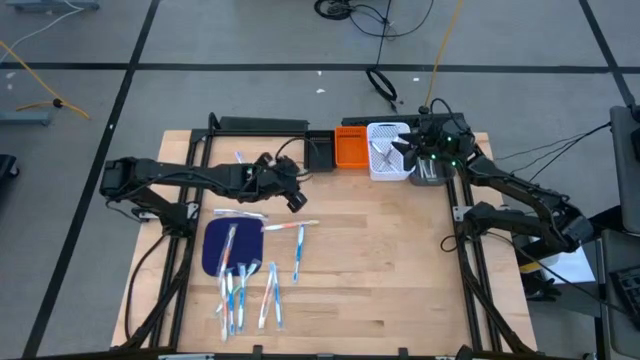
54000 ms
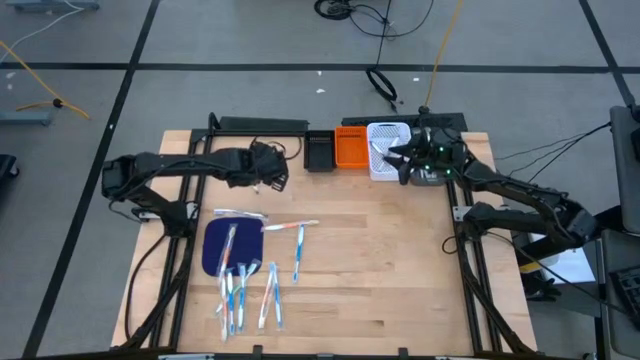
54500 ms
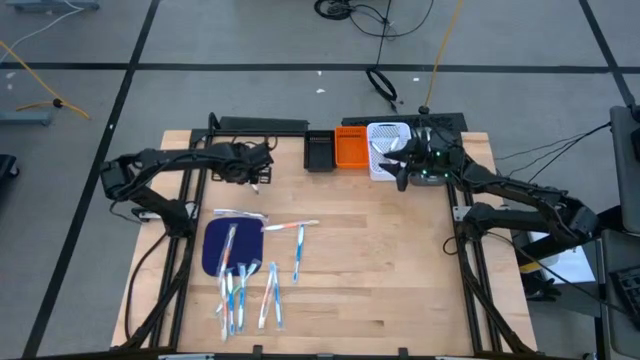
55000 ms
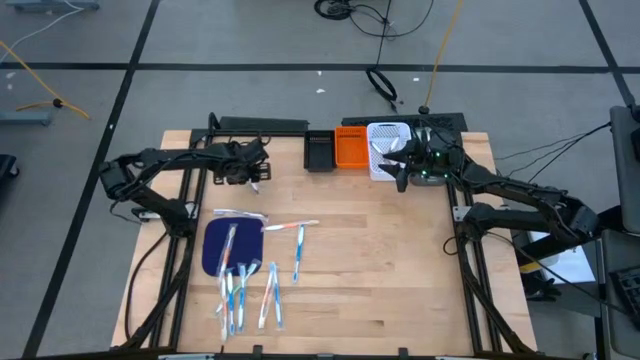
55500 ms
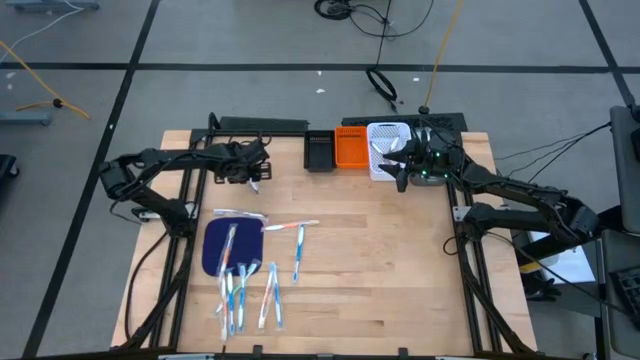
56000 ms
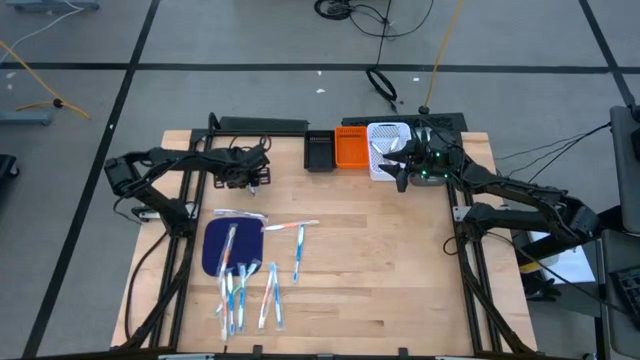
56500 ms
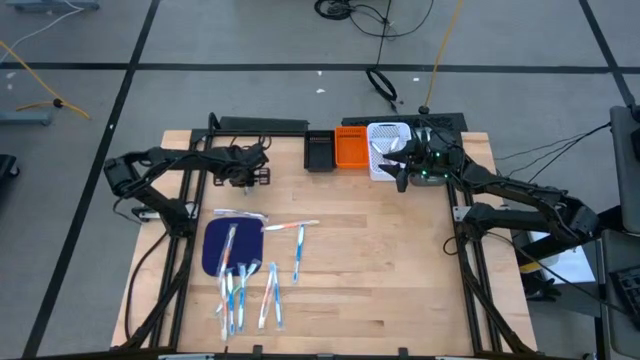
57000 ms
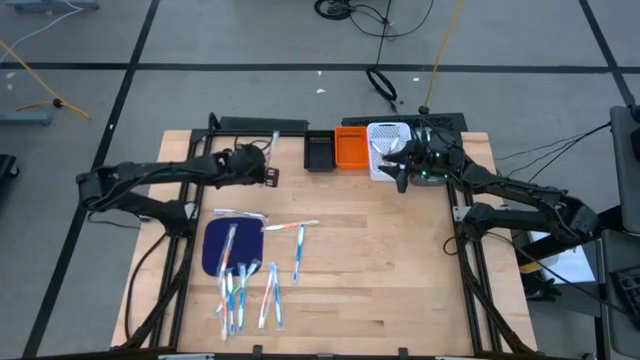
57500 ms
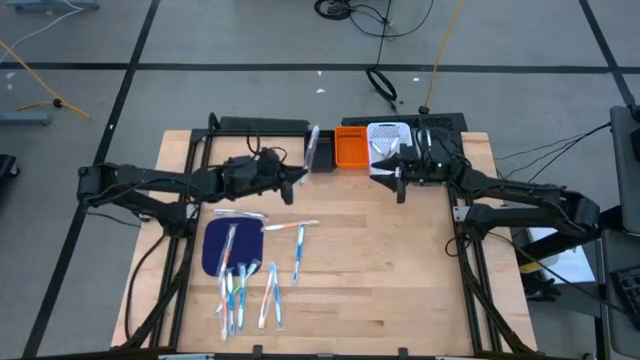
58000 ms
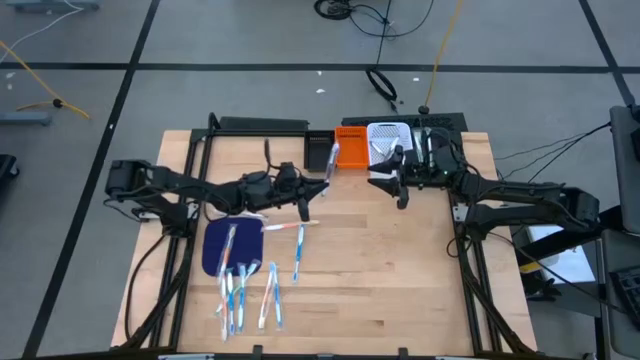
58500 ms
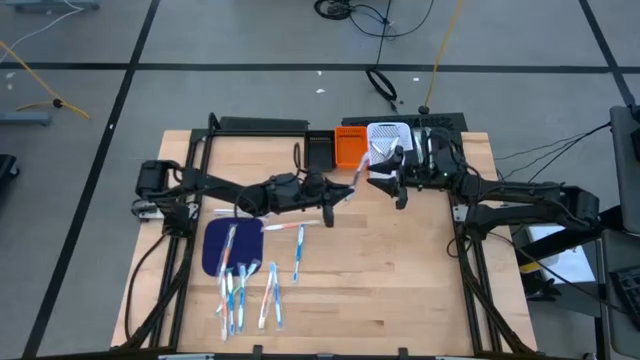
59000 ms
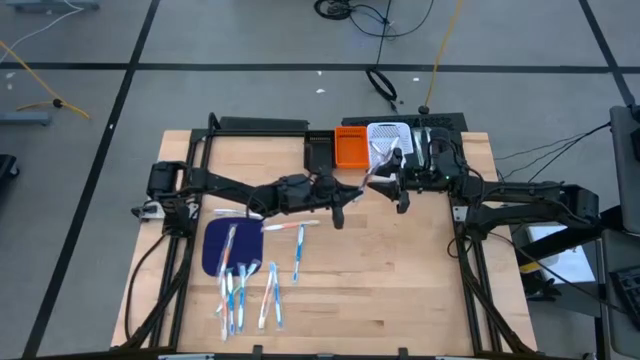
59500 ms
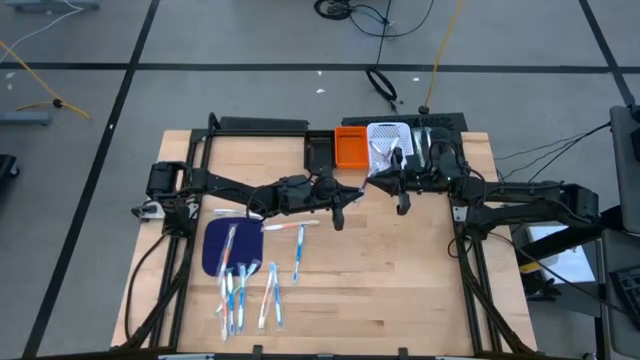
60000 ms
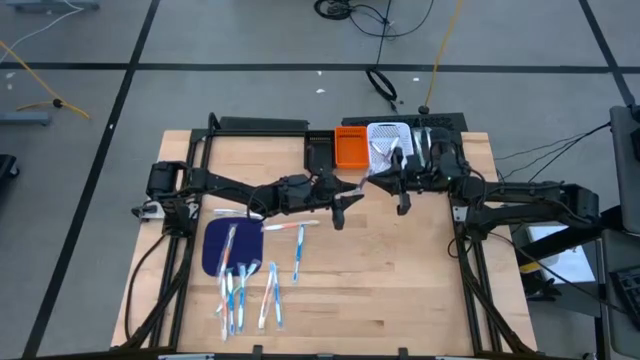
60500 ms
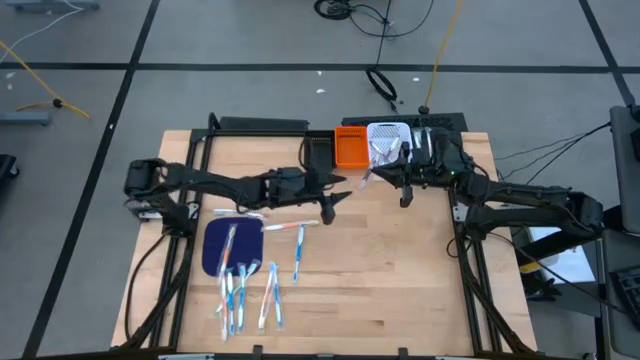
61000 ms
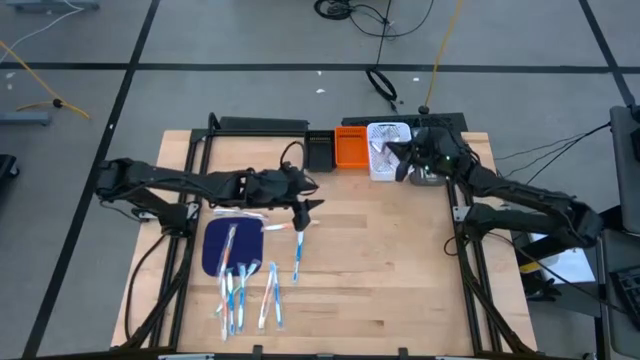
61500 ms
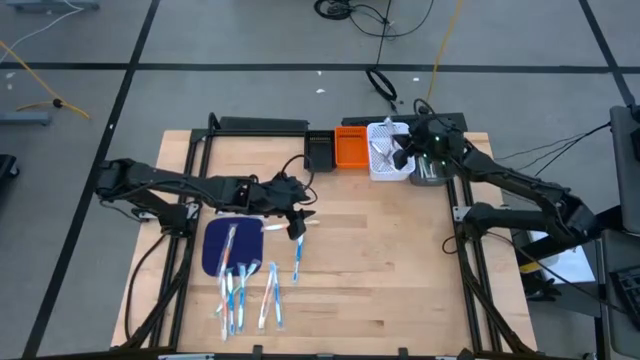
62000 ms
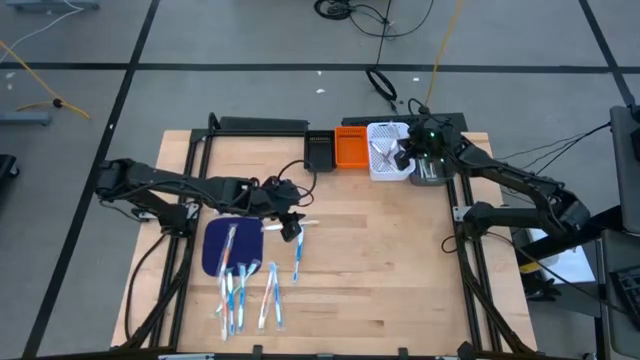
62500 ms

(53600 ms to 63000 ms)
Task: Pick & Place Toothbrushes
Put the purple toothbrush into the white bin

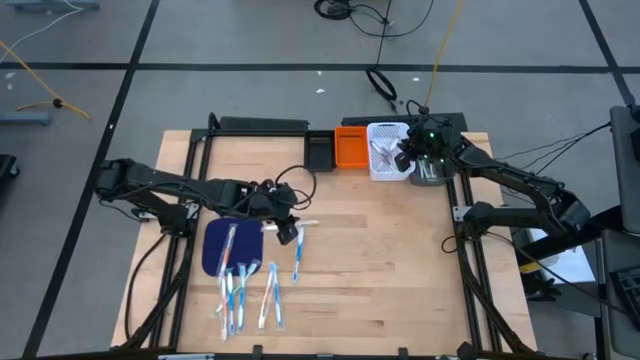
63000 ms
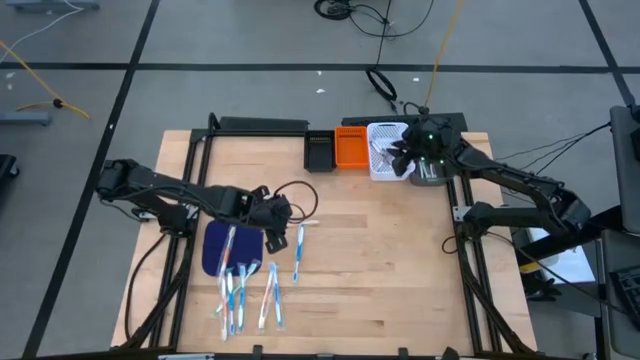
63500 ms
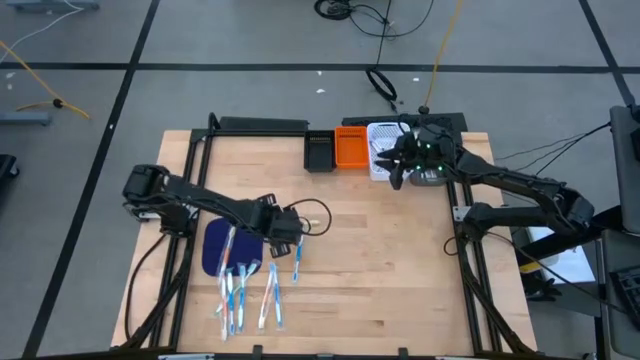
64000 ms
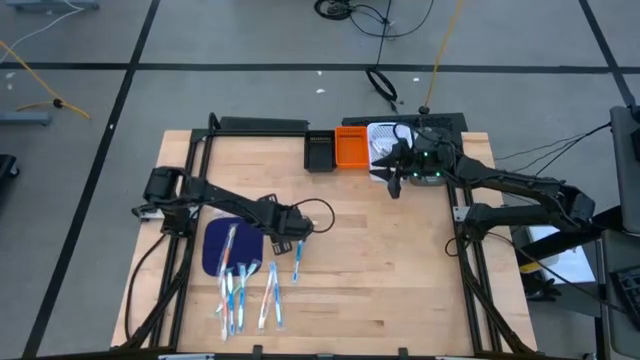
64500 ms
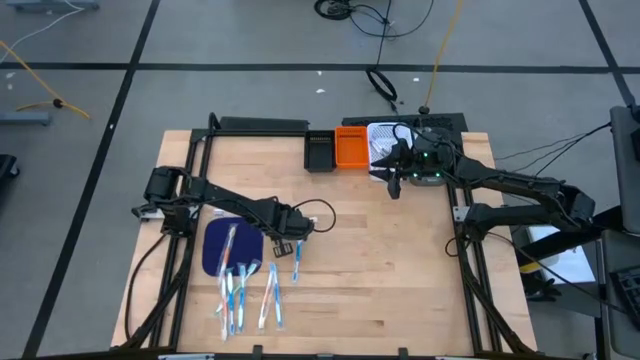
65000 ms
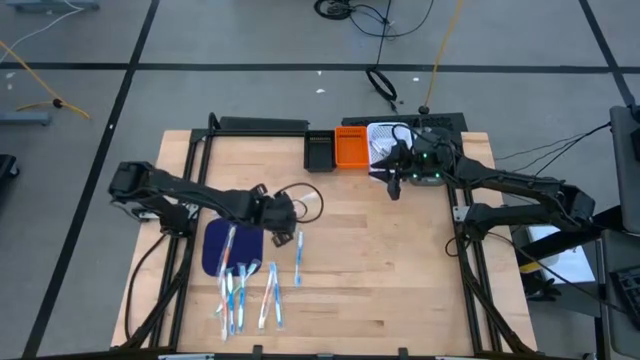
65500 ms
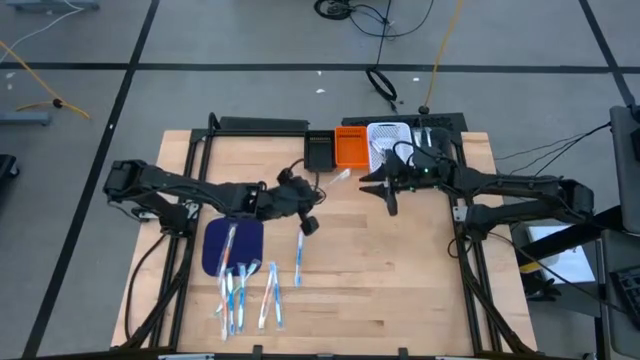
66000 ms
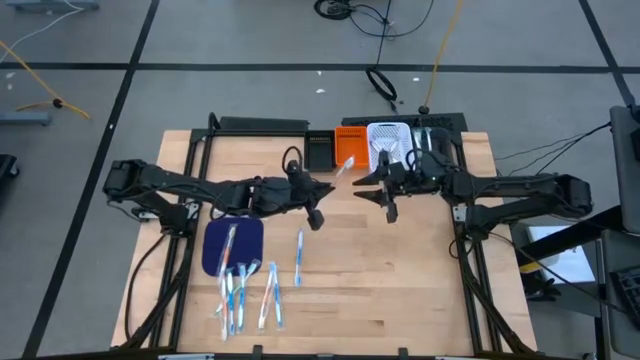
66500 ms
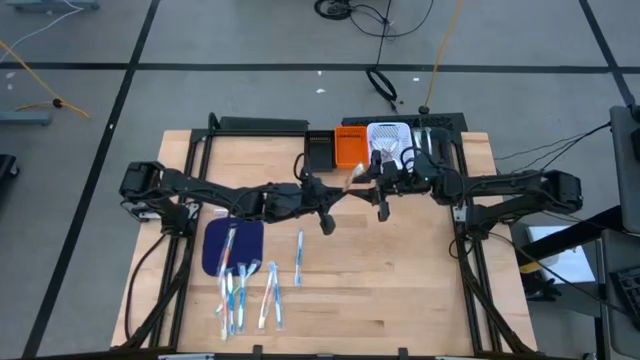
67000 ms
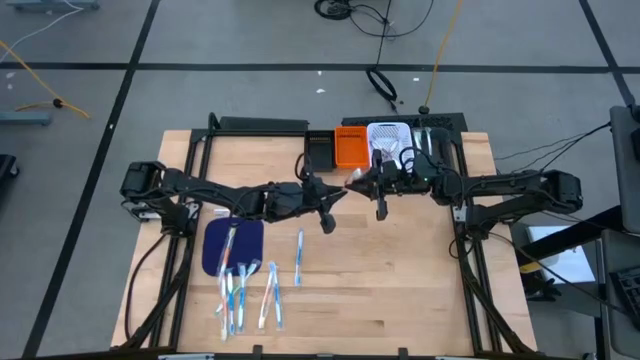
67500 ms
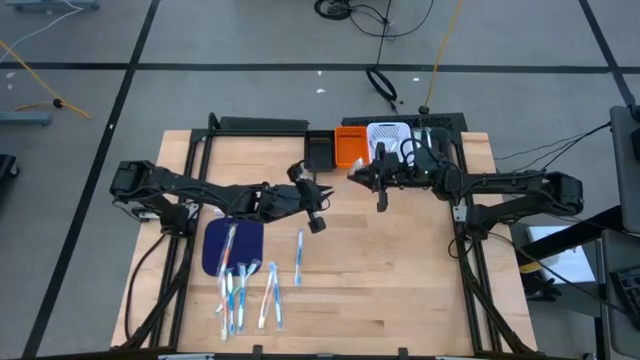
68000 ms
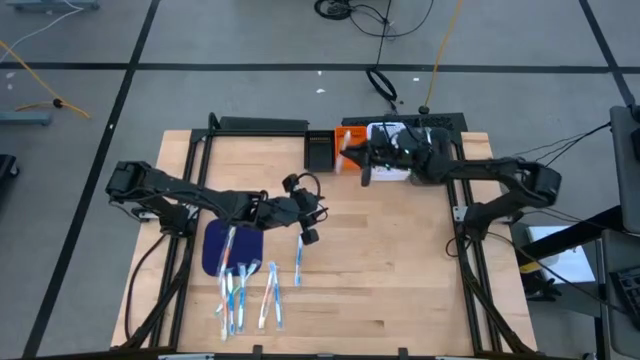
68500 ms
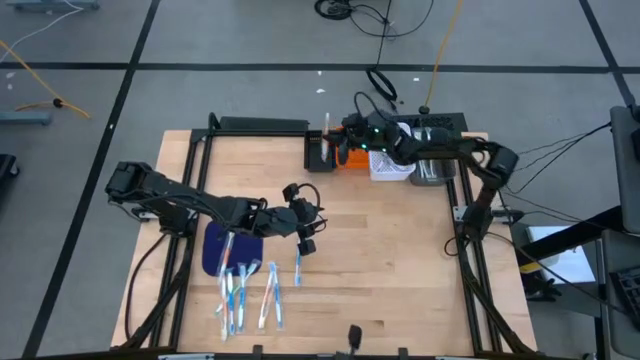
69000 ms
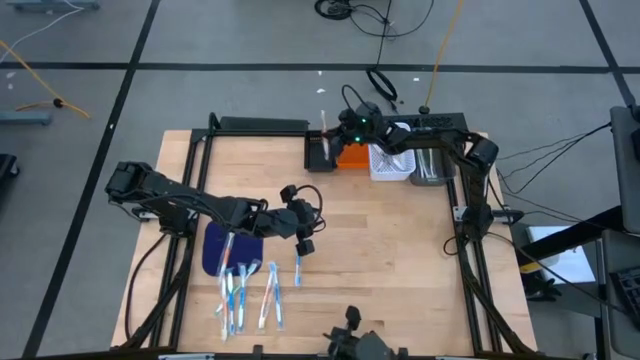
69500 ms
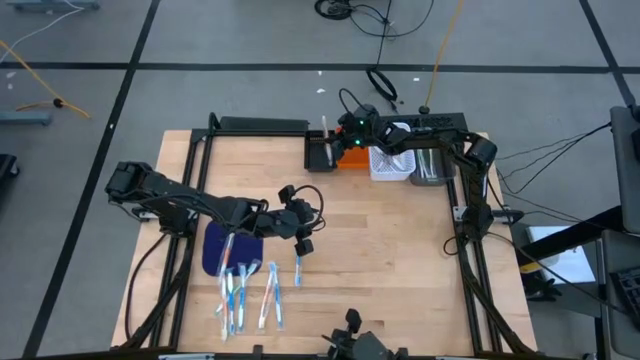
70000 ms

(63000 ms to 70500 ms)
Put the orange toothbrush into the black bin

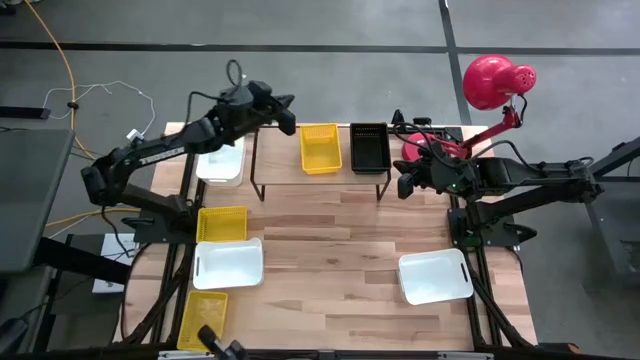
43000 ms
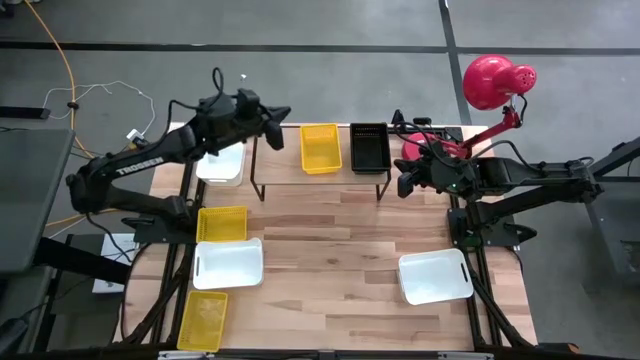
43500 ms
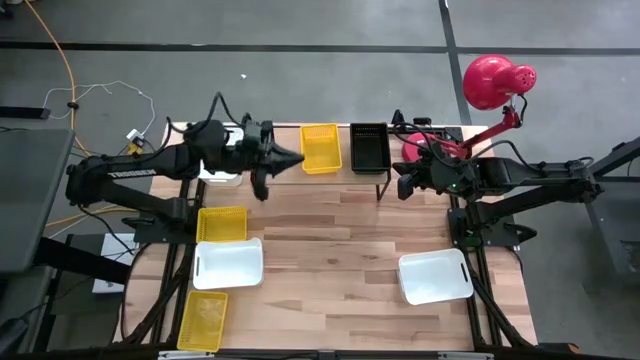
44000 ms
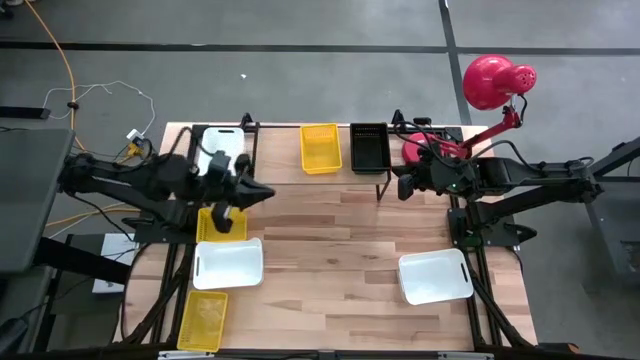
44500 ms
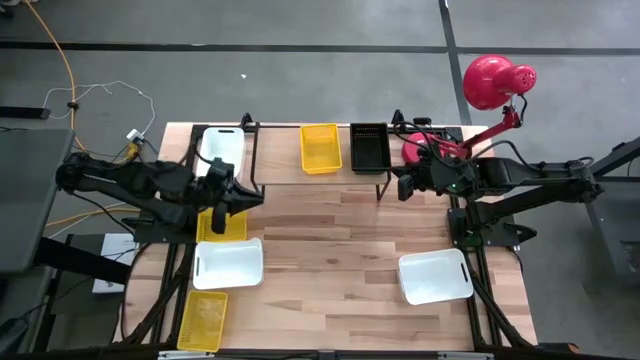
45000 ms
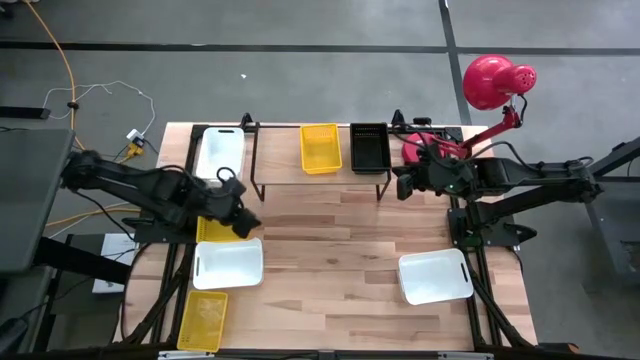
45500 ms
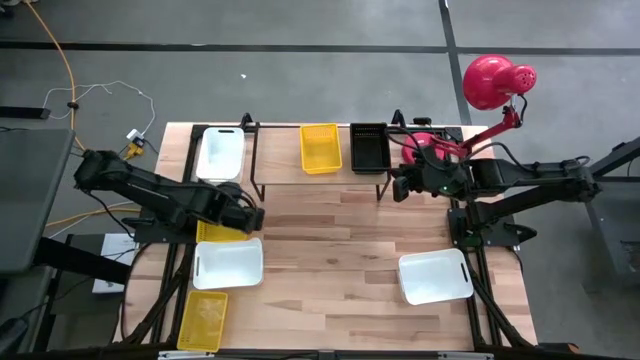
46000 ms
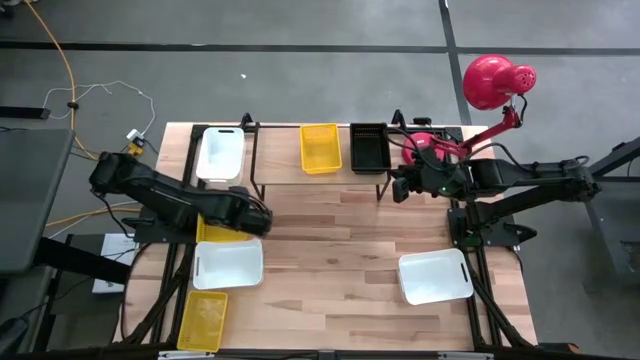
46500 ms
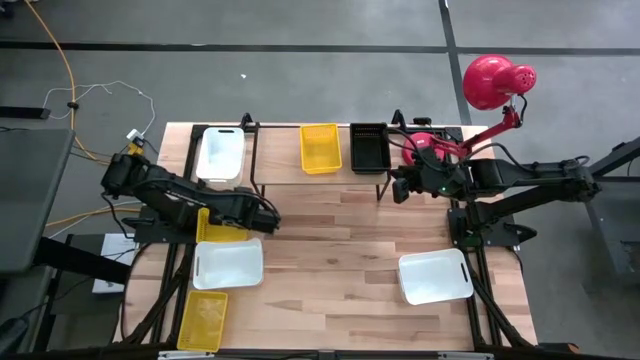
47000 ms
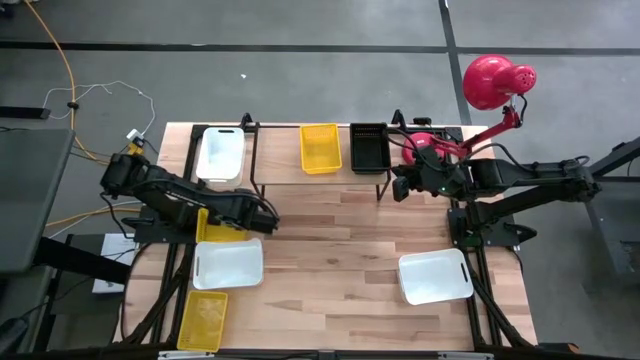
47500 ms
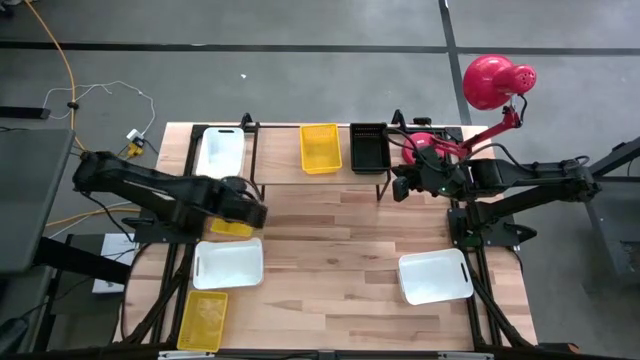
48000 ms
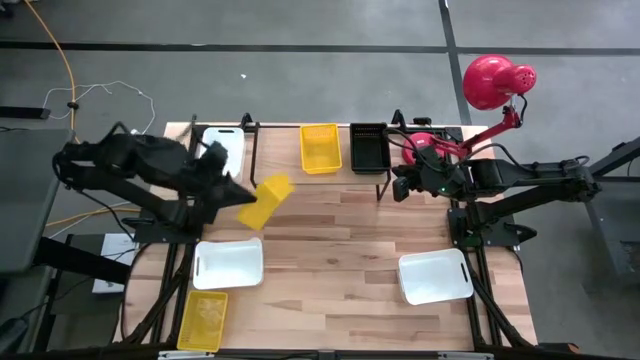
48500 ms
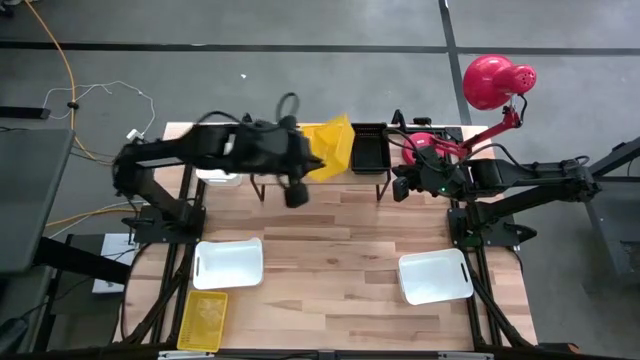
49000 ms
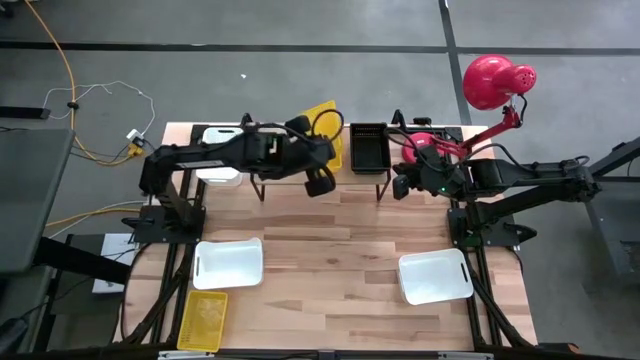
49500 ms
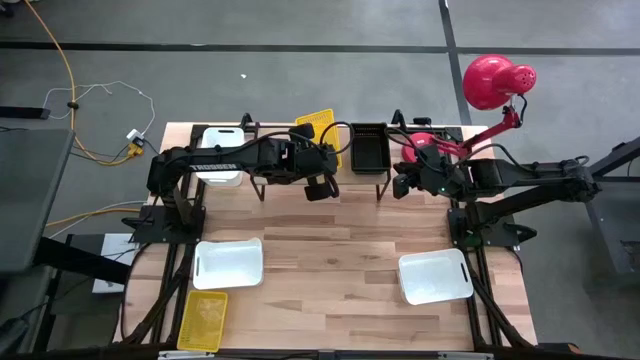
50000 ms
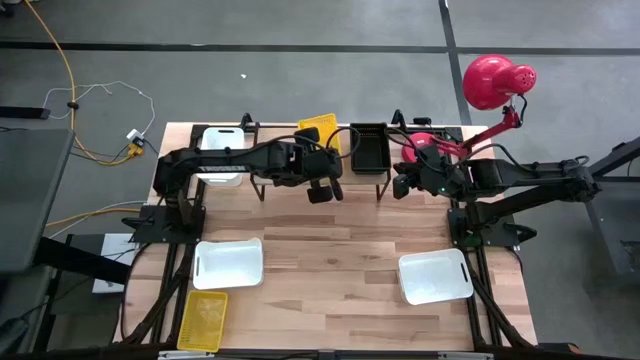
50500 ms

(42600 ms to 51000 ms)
Task: Stack baskets on shelf by color
Stack the top yellow bin into the yellow bin
